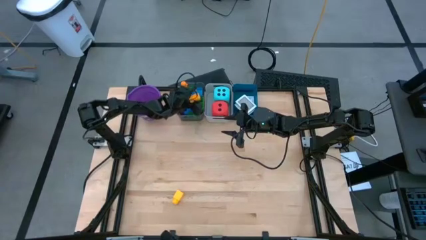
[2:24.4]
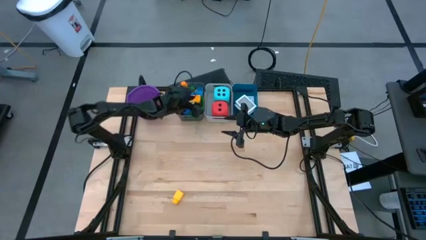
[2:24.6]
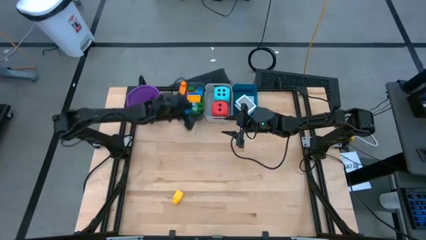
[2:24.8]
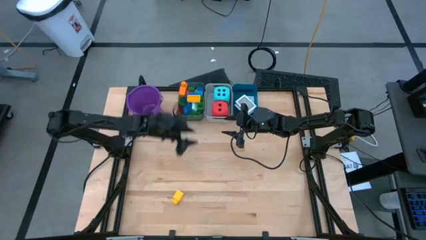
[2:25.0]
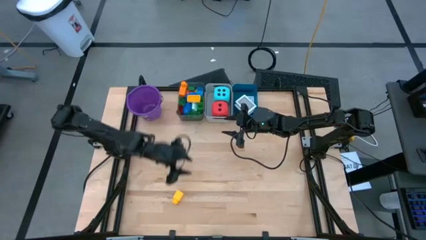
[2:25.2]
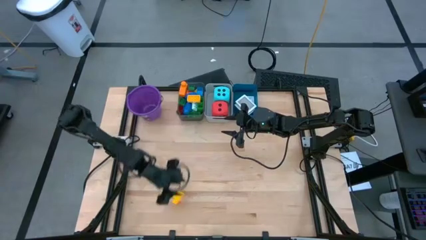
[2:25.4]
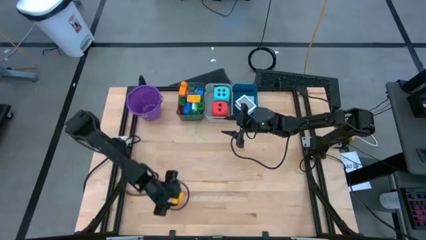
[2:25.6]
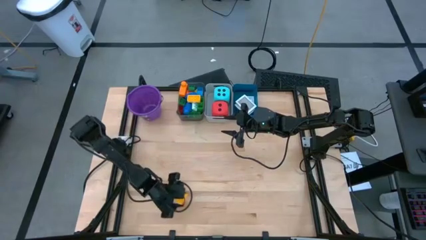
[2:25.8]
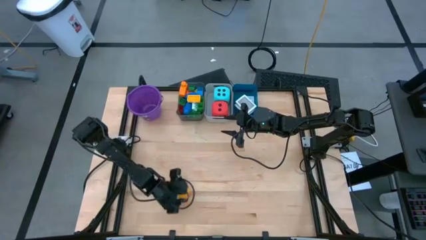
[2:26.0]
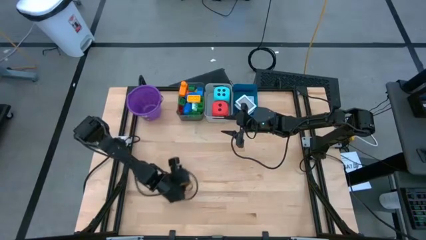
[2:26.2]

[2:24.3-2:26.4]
Task: Pick & Place Toys
Put the yellow game piece into the black bin

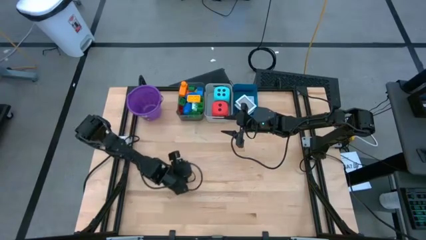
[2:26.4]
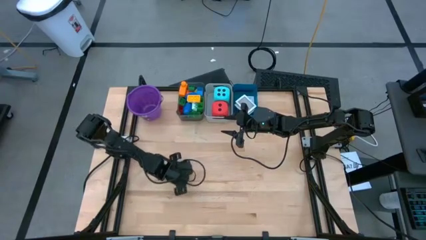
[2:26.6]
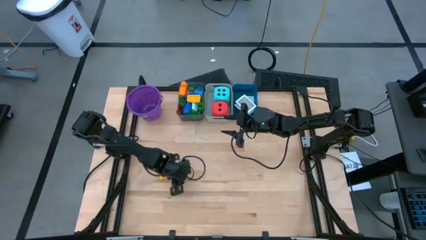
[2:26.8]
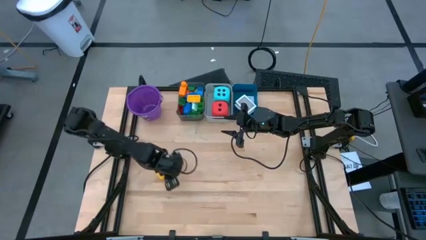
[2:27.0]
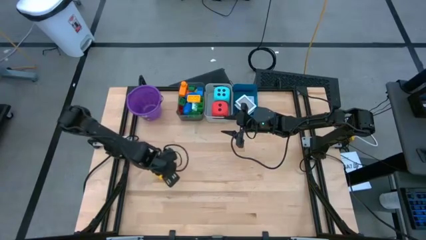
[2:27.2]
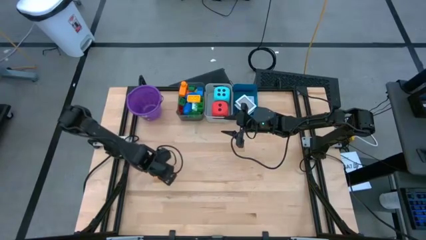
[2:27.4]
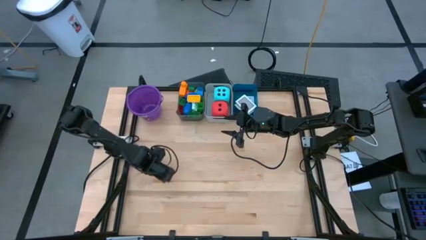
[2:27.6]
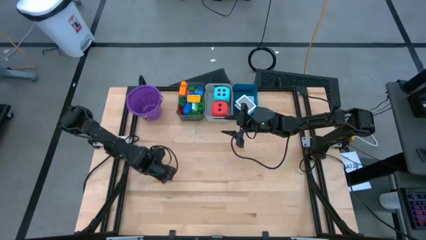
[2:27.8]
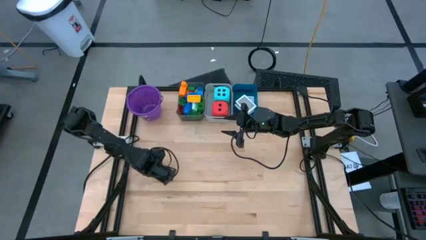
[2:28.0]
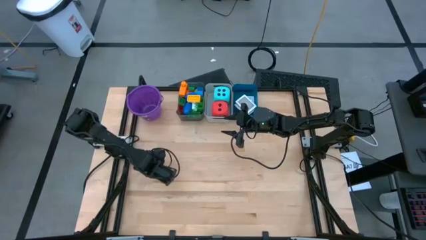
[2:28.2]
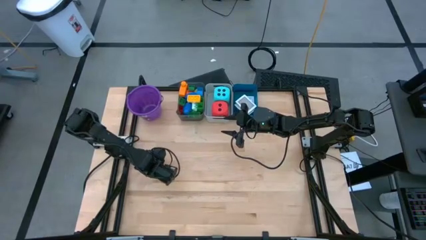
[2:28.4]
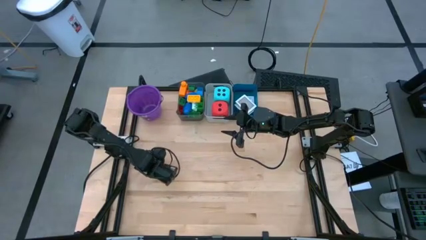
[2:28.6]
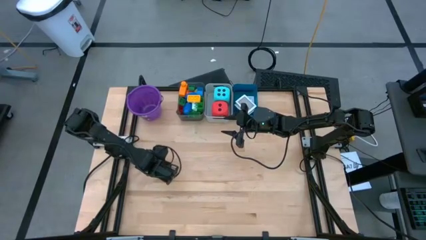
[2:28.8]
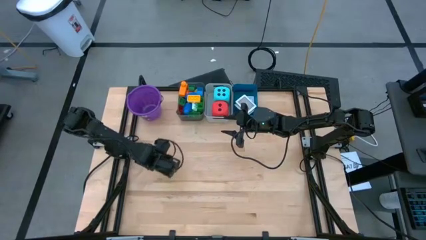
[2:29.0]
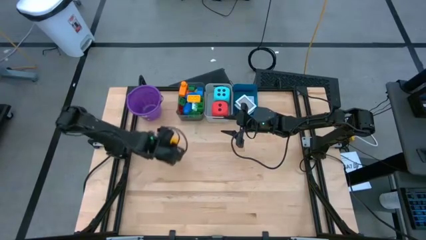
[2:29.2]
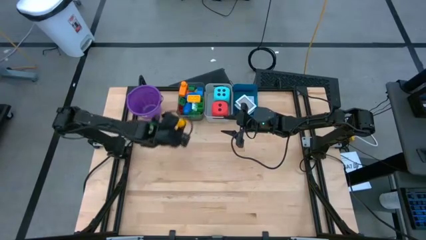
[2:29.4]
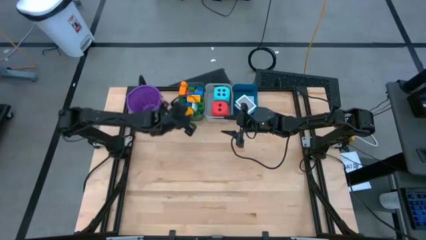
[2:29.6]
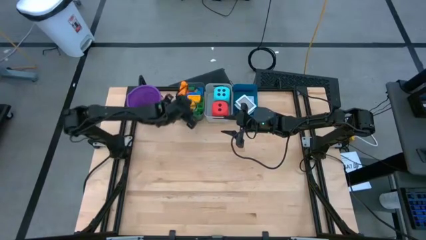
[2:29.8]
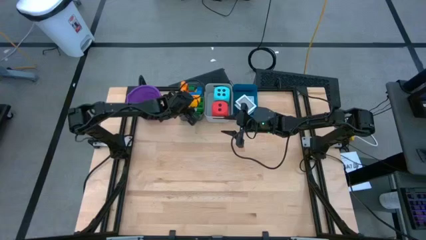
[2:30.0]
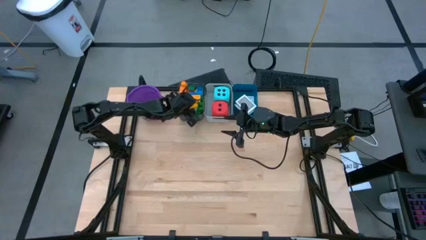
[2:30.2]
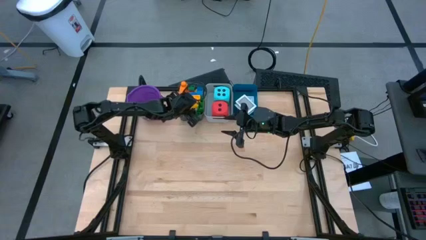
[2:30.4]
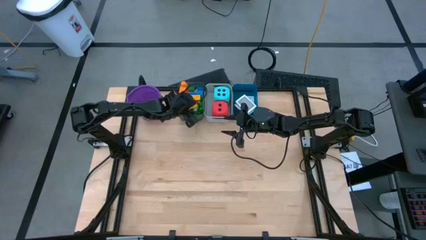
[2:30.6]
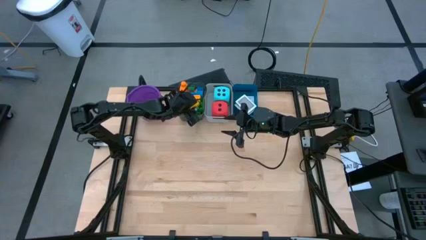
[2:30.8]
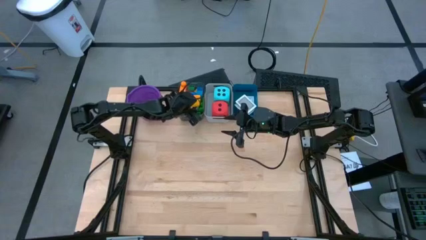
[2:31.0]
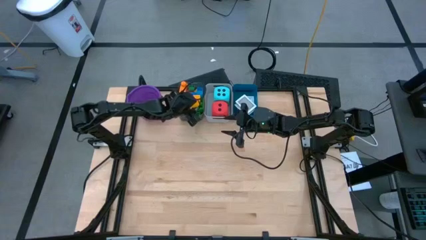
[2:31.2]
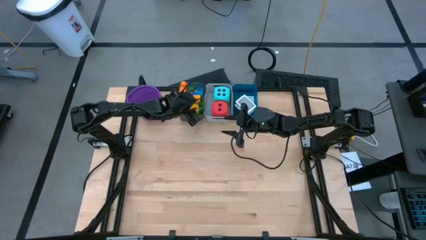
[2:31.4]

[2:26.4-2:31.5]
Put the yellow game piece into the black bin

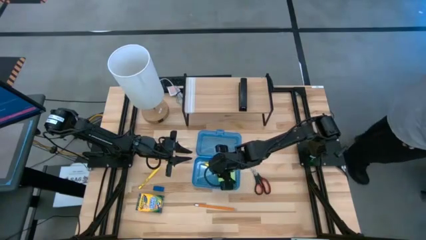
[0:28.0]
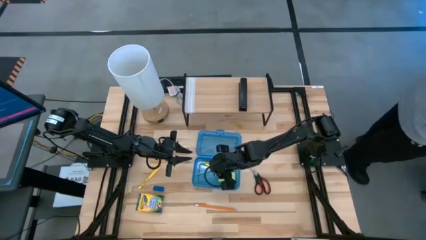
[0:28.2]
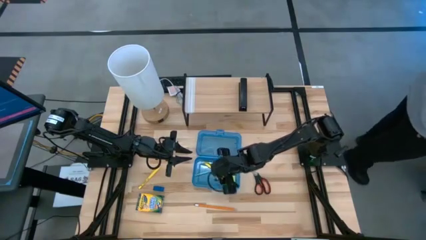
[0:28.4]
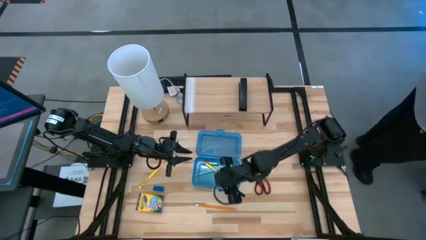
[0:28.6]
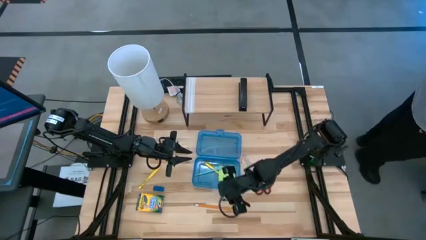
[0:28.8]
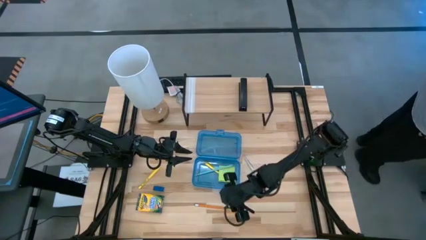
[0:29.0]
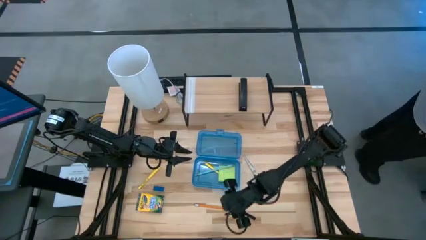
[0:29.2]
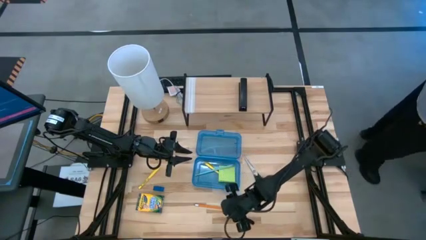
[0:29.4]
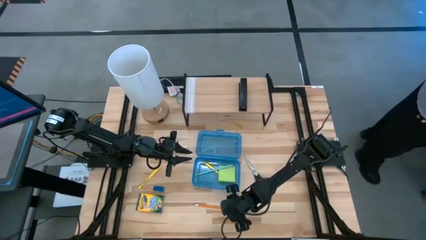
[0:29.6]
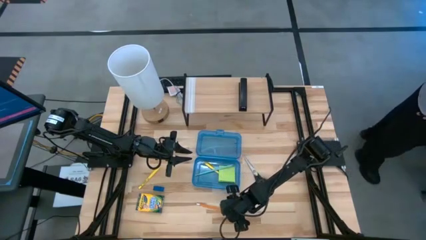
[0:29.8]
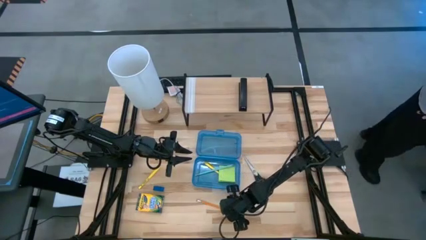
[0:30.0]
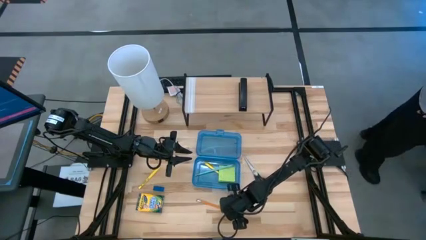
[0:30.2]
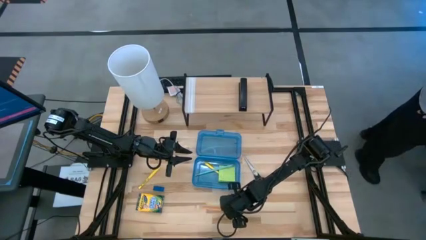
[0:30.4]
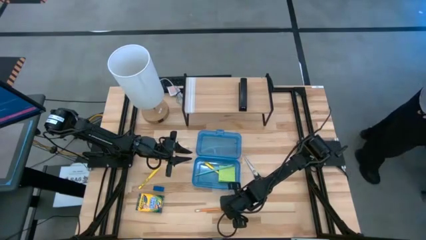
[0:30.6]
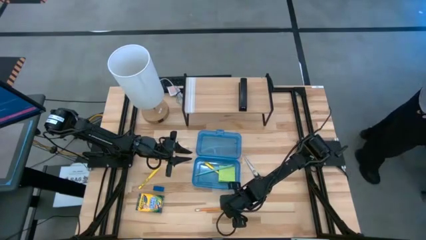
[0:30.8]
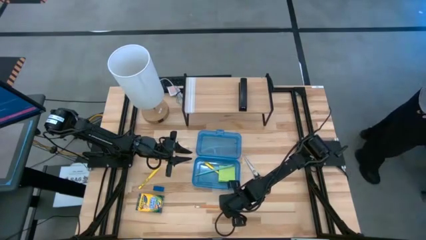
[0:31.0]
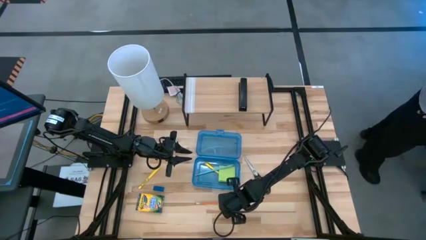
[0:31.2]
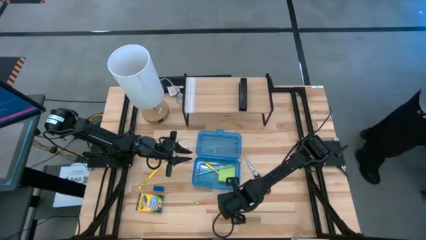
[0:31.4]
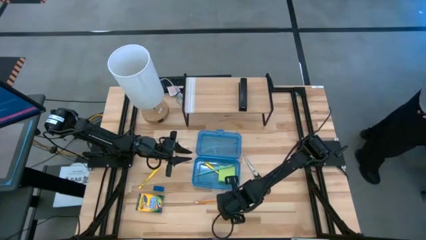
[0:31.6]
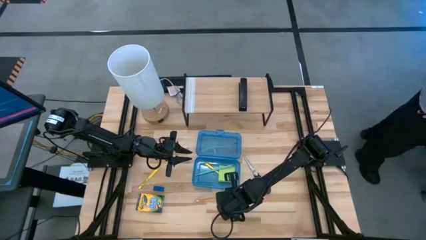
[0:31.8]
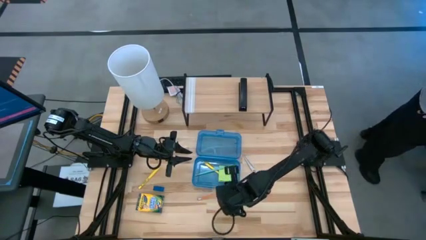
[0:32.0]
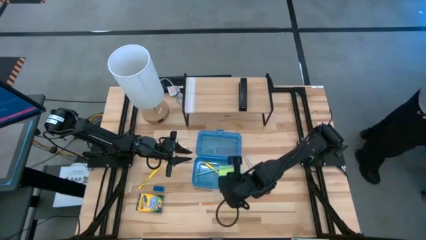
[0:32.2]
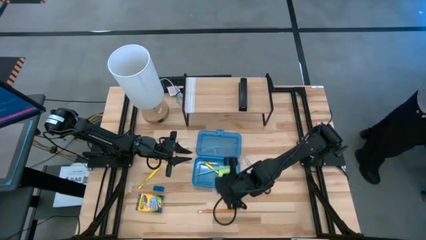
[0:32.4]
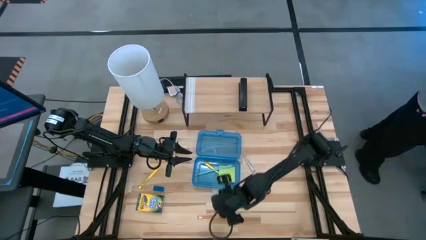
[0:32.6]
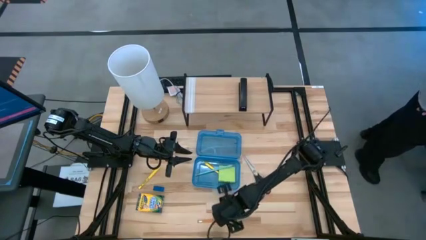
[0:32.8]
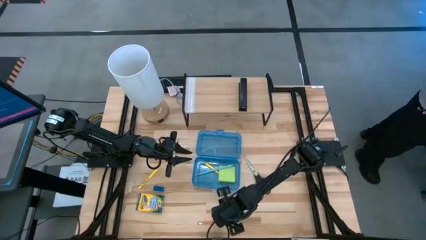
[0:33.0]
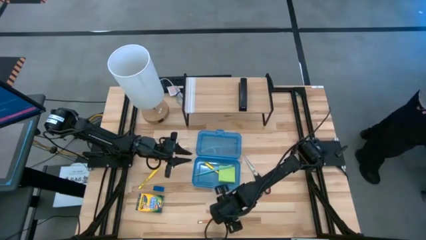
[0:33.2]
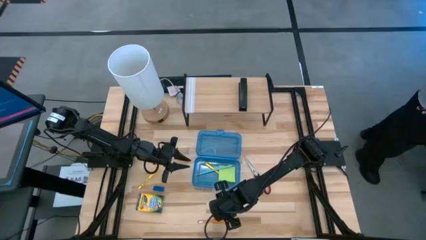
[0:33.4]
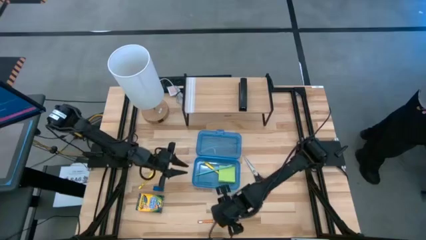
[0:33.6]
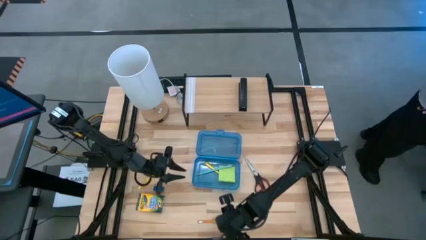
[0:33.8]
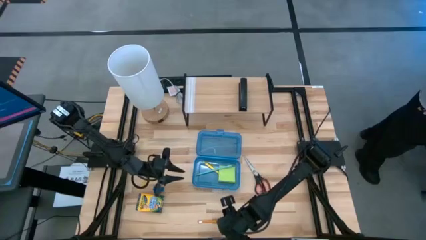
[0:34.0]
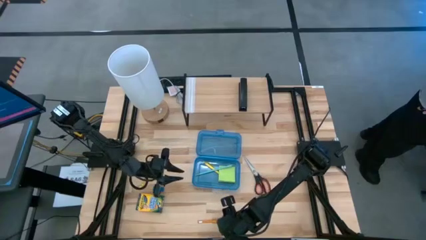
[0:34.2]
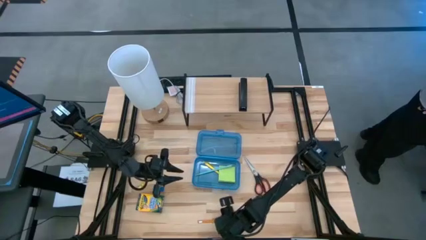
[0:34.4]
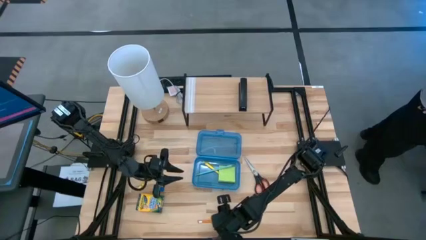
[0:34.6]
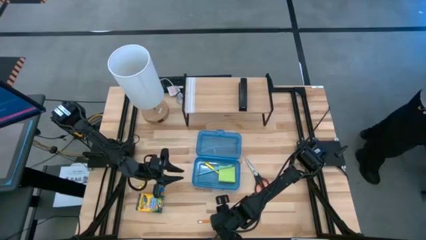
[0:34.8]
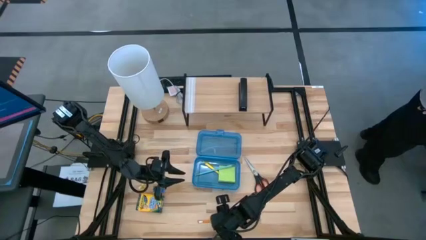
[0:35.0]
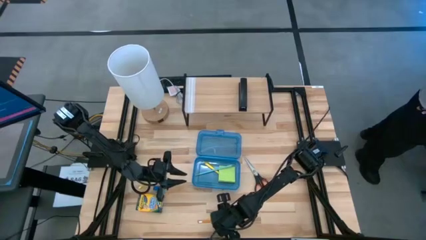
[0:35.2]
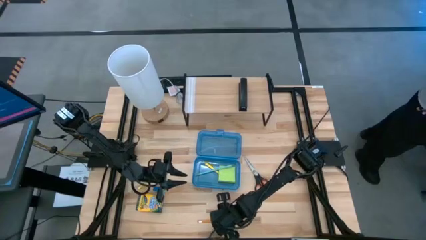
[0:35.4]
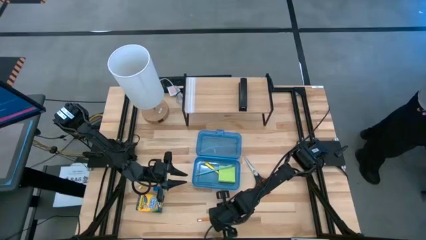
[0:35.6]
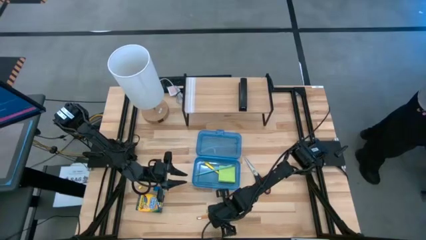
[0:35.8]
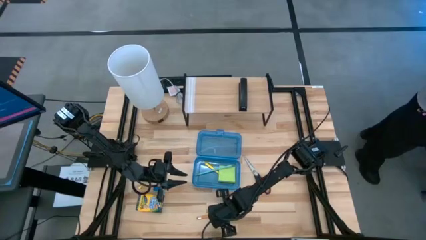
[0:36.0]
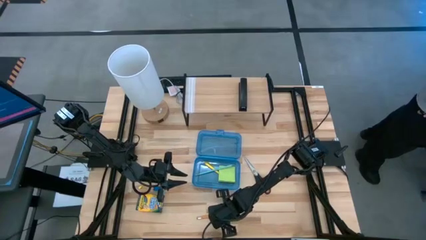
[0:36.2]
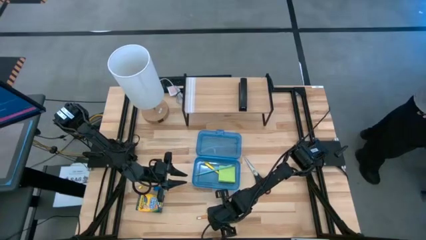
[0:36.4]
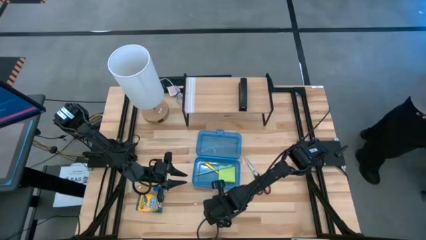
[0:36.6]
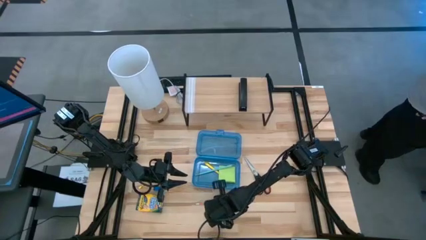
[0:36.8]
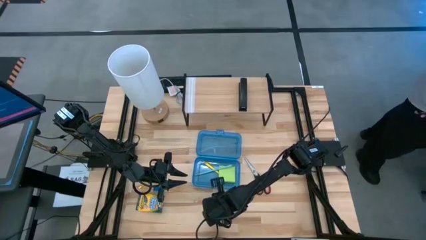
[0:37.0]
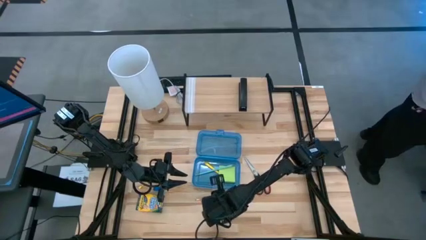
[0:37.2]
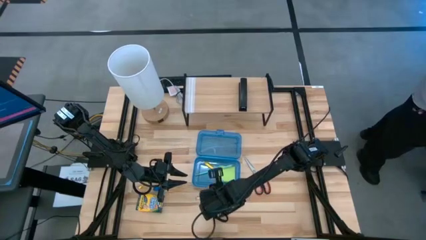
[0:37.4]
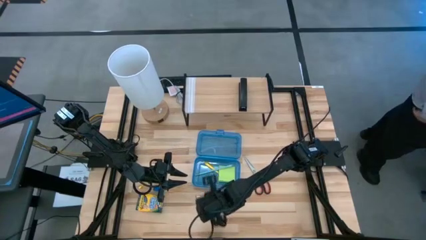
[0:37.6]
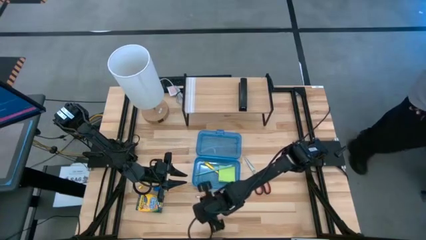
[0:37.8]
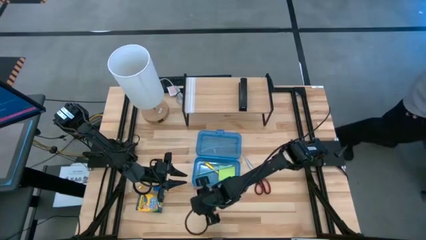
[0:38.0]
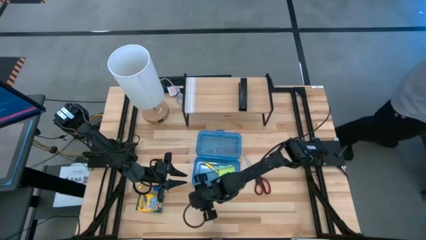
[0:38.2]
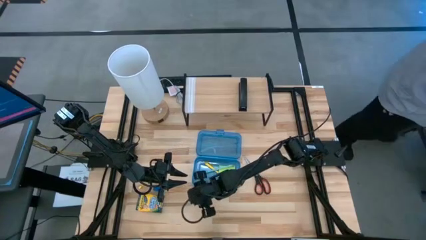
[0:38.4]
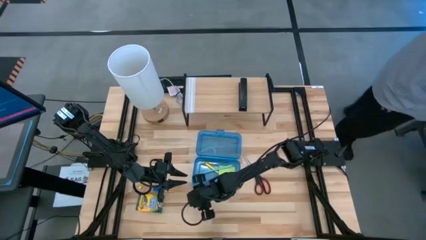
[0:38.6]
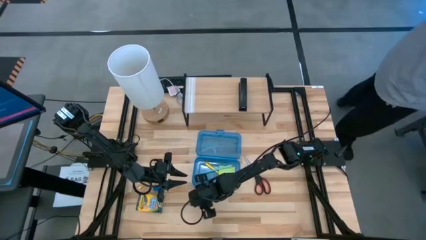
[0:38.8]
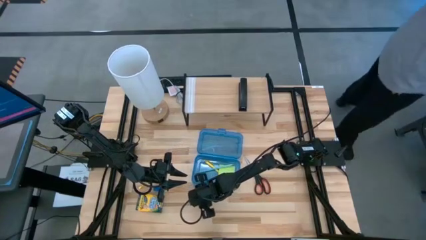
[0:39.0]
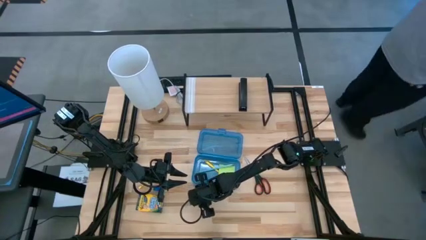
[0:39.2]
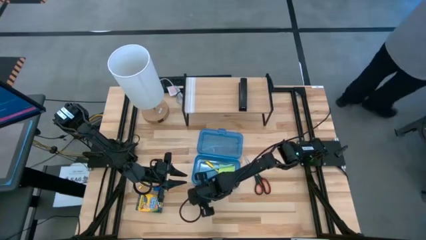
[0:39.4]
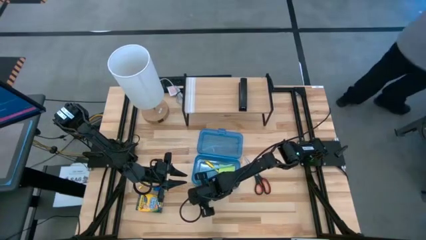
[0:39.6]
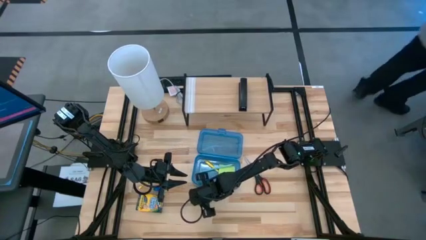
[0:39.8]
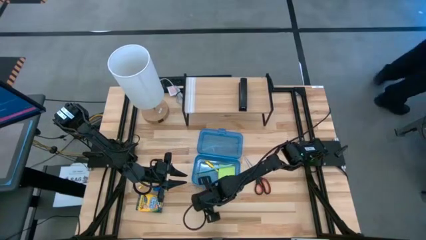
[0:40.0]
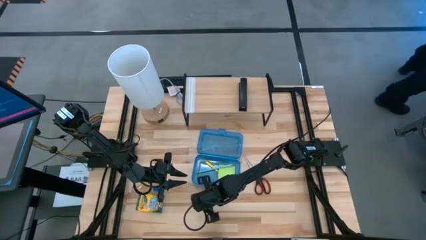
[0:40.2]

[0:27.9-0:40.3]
Task: Pack school essentials
Put the orange pencil into the blue supply box
